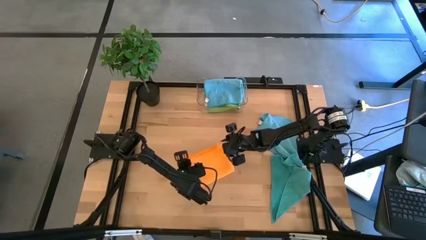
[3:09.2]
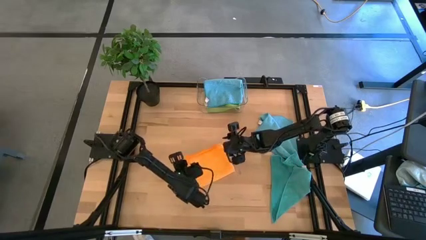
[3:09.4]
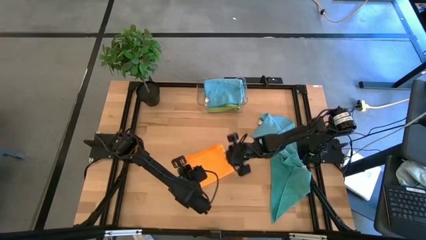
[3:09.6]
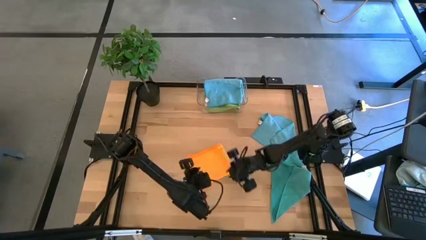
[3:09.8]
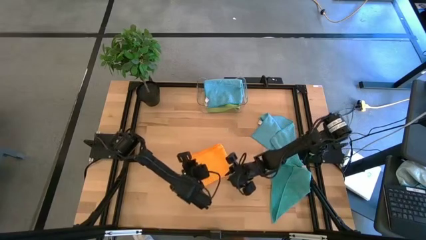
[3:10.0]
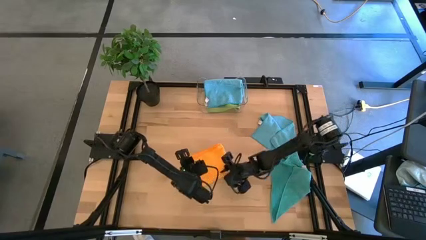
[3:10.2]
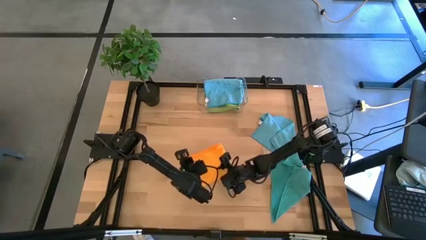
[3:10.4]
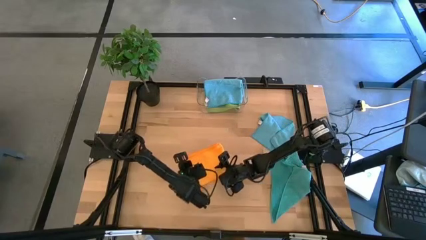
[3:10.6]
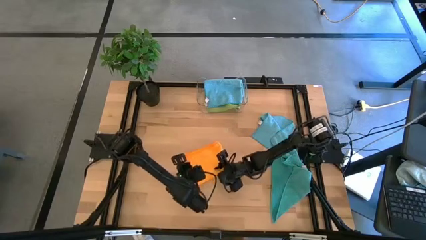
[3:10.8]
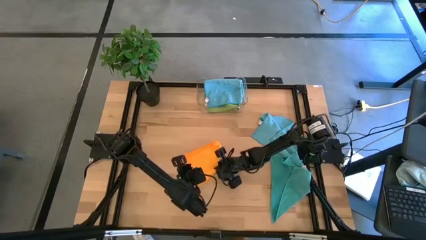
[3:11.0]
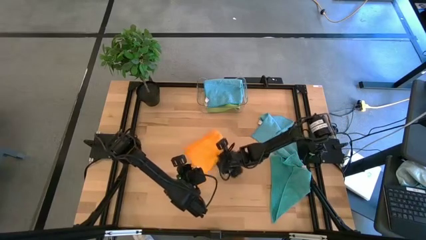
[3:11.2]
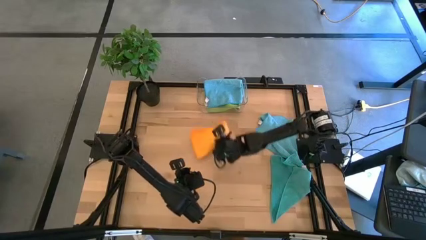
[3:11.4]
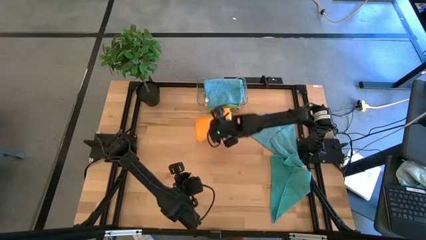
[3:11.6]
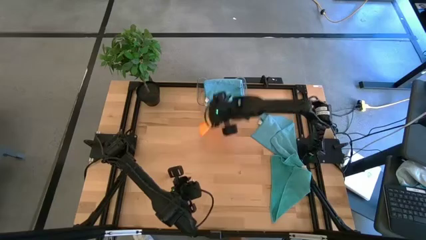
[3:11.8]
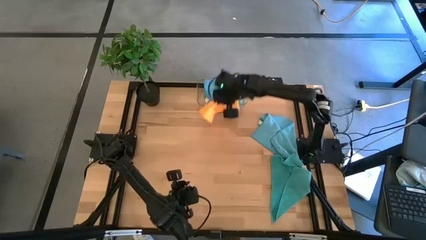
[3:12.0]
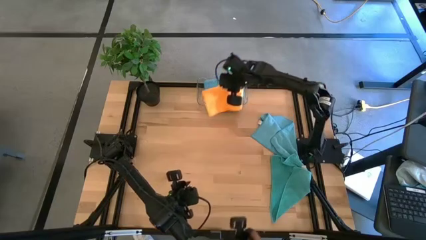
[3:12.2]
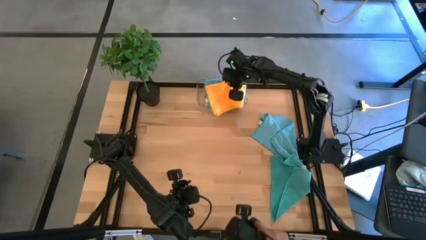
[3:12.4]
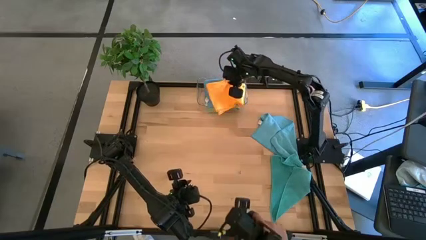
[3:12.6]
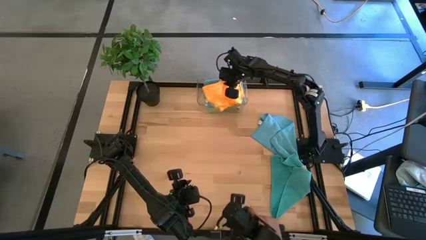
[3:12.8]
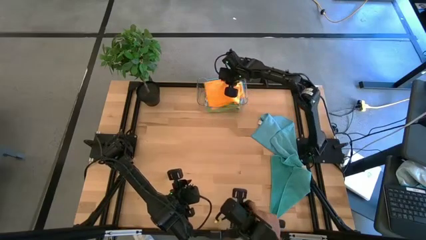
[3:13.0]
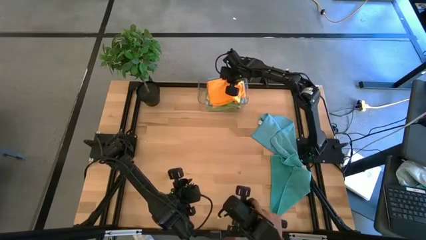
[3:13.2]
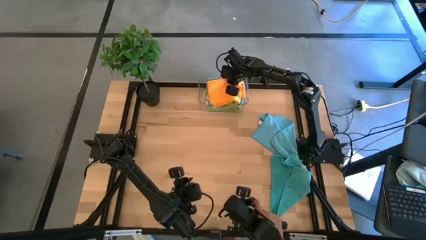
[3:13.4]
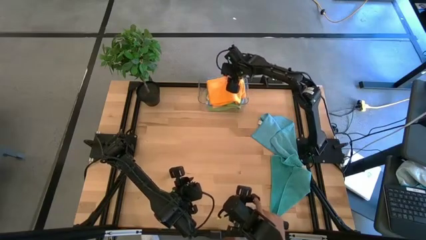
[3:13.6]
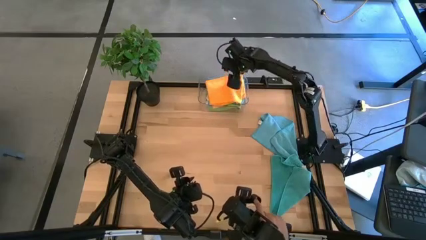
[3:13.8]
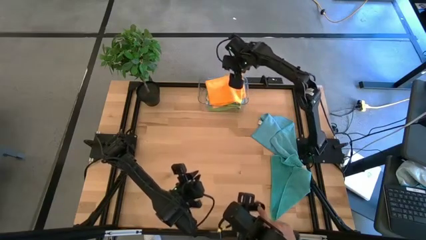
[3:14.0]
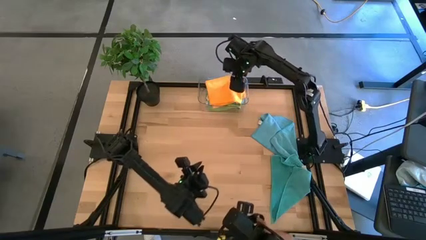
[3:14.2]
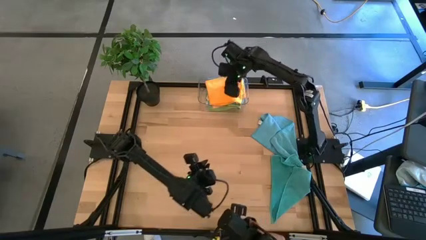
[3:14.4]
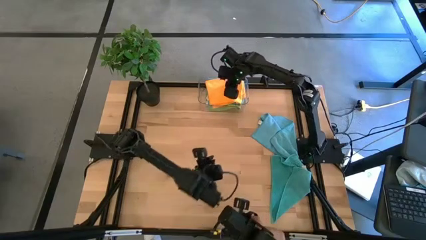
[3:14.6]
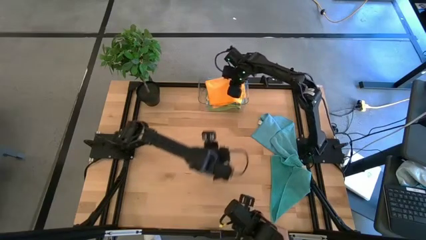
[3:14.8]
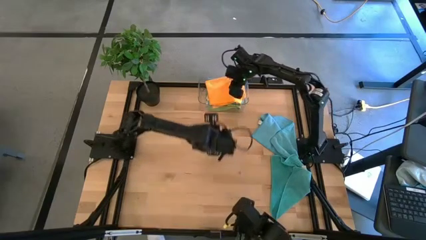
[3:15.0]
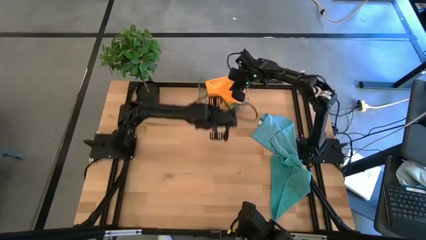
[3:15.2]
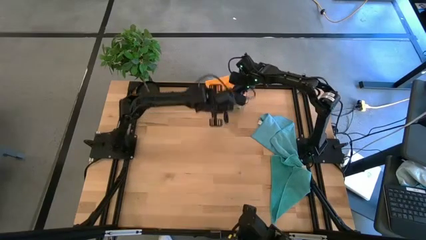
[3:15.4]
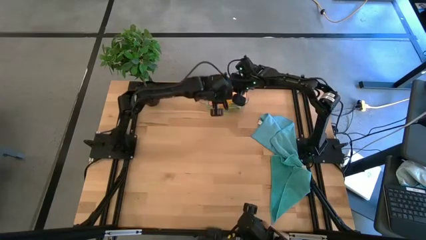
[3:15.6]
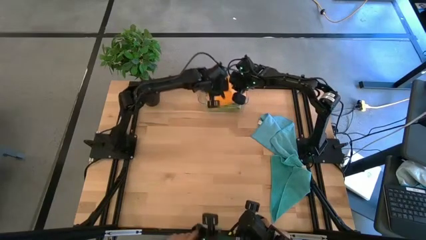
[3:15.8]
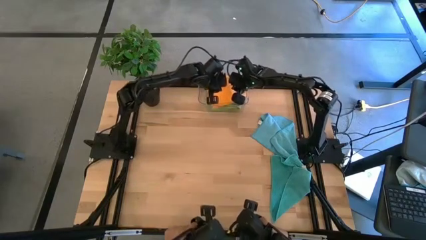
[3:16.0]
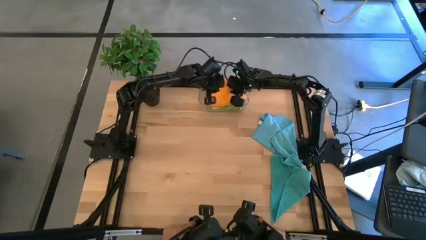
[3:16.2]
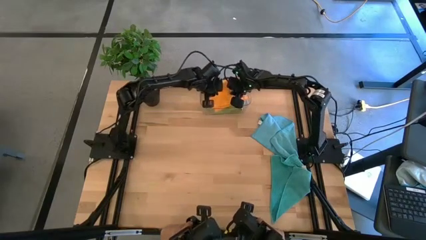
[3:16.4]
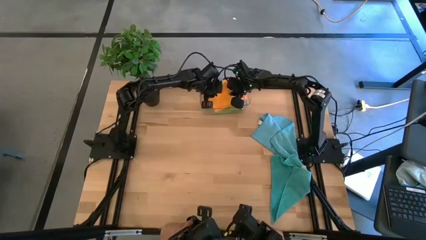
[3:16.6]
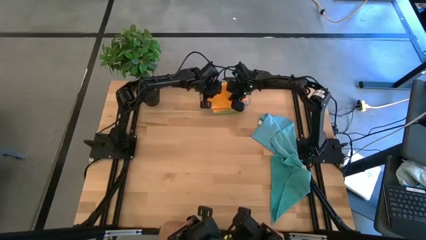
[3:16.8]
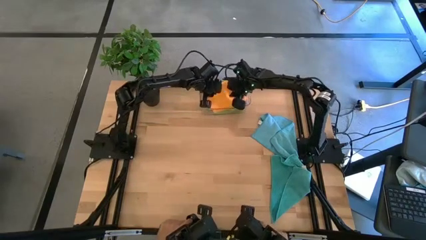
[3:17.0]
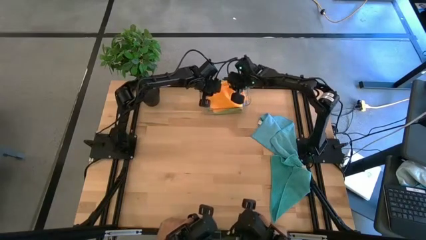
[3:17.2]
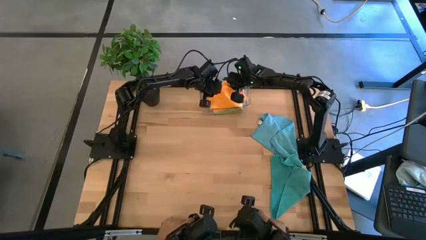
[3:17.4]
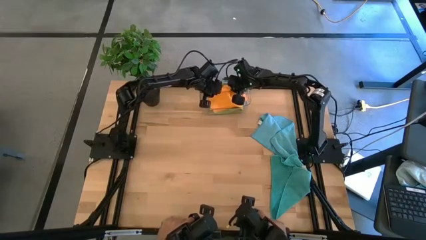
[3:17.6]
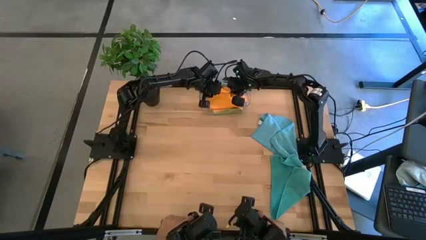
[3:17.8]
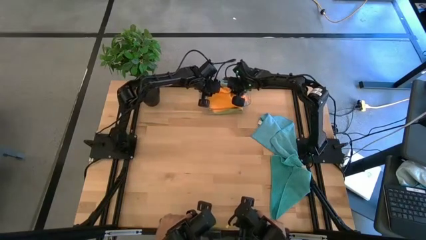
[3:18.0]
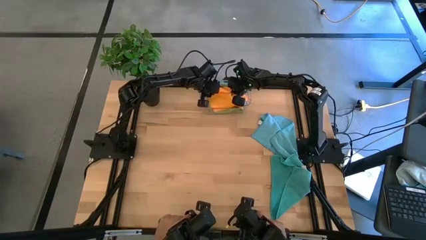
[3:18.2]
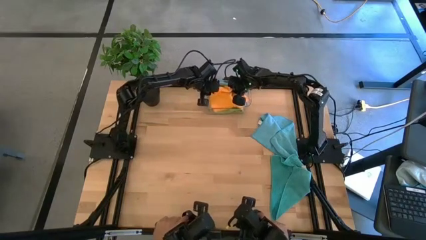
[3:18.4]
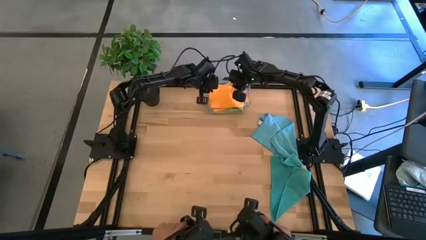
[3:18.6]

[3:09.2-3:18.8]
Task: Fold microfiber towels
Put the folded orange microfiber towel into the transparent bin

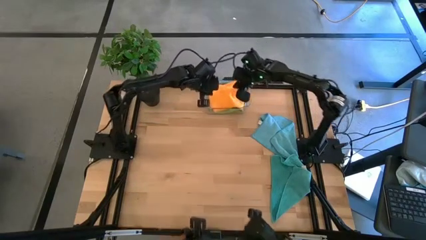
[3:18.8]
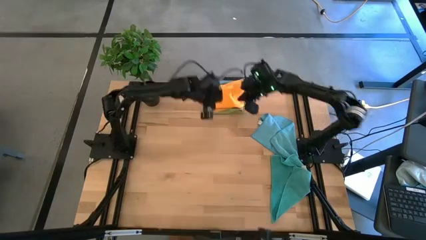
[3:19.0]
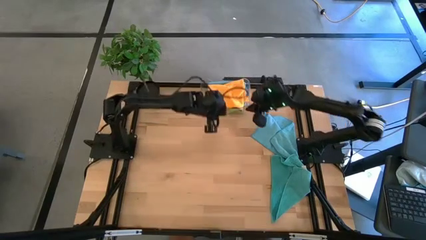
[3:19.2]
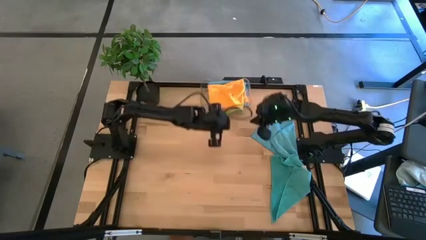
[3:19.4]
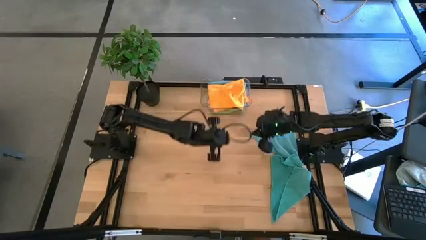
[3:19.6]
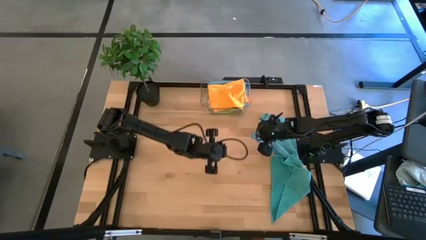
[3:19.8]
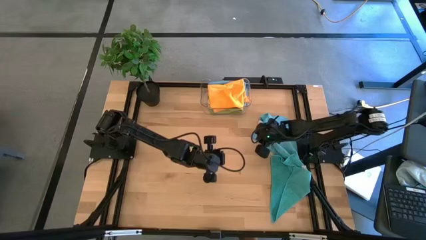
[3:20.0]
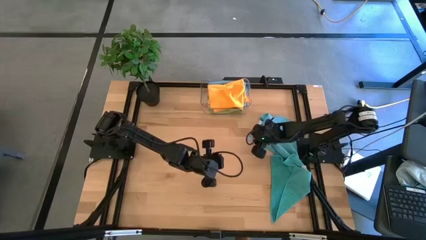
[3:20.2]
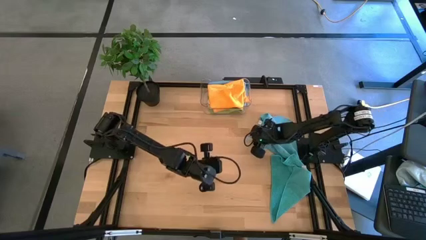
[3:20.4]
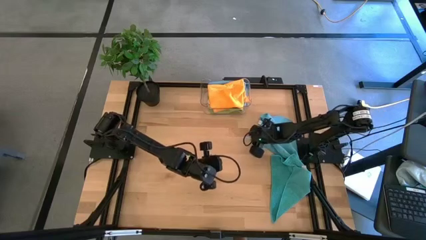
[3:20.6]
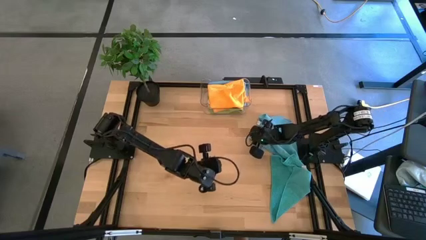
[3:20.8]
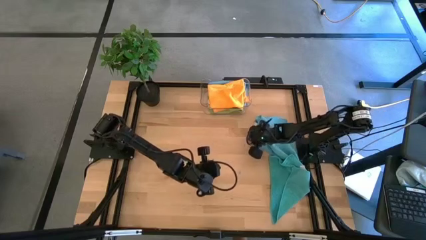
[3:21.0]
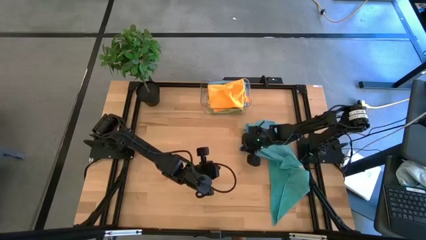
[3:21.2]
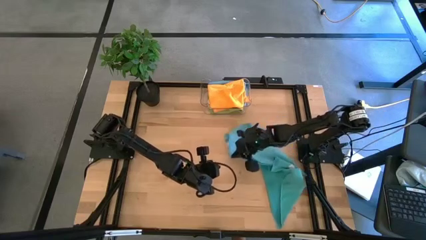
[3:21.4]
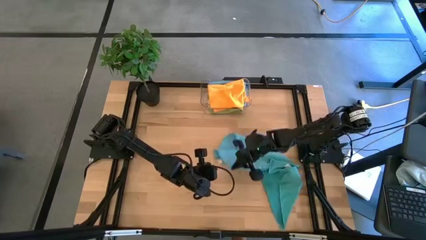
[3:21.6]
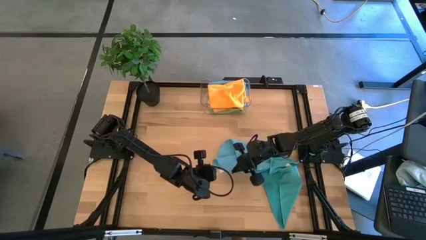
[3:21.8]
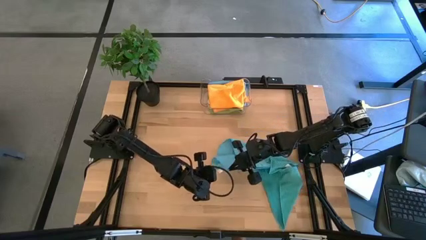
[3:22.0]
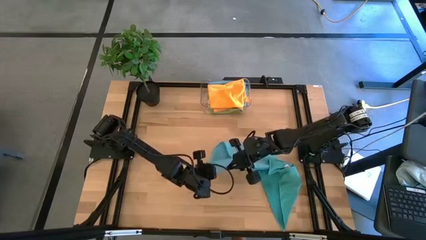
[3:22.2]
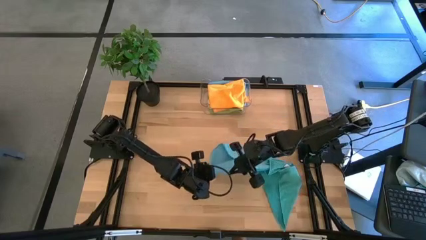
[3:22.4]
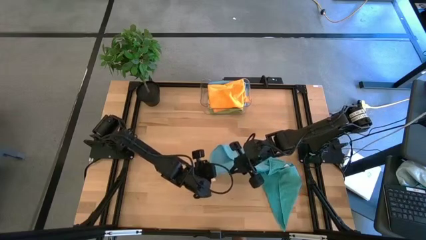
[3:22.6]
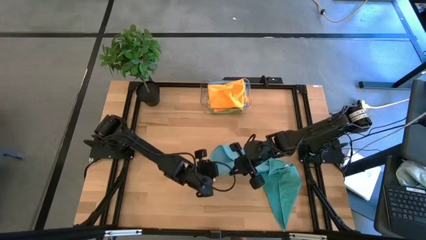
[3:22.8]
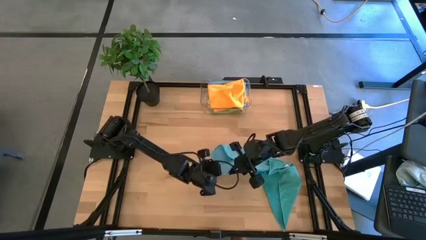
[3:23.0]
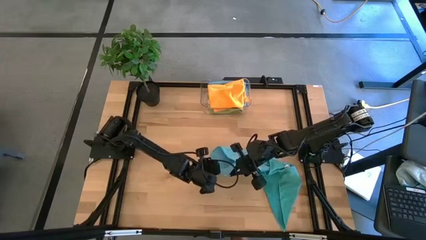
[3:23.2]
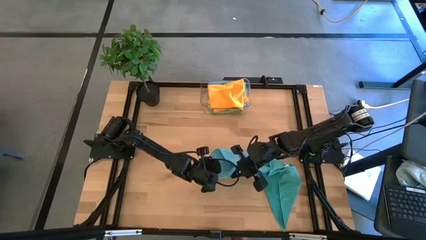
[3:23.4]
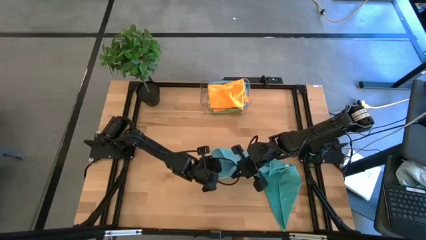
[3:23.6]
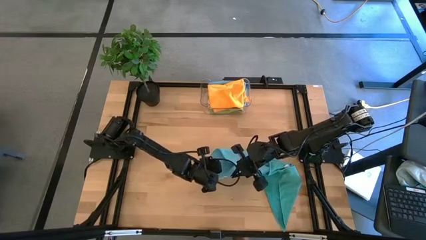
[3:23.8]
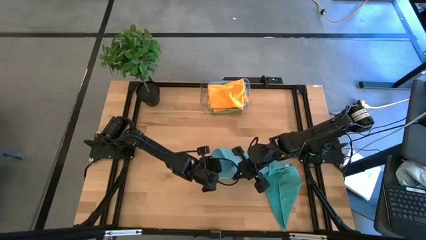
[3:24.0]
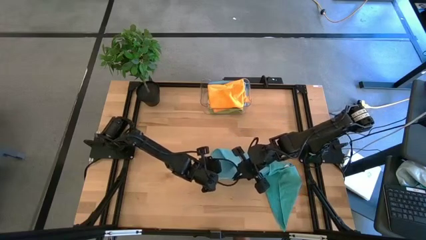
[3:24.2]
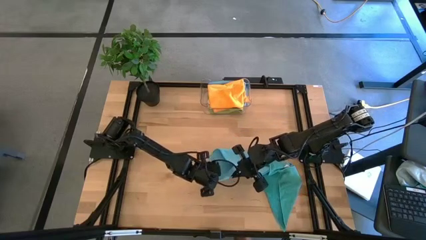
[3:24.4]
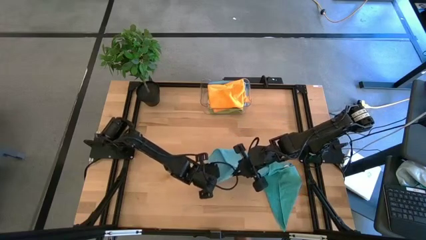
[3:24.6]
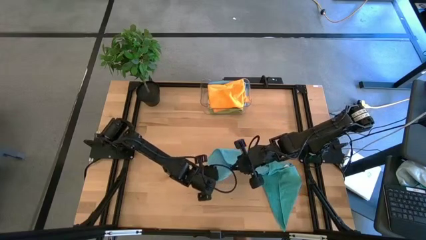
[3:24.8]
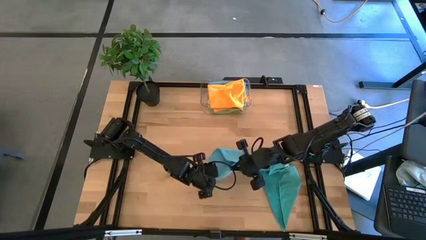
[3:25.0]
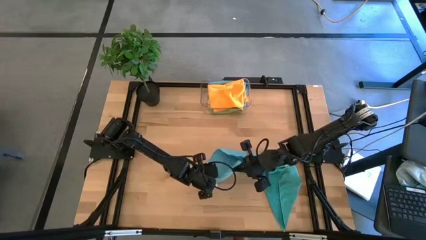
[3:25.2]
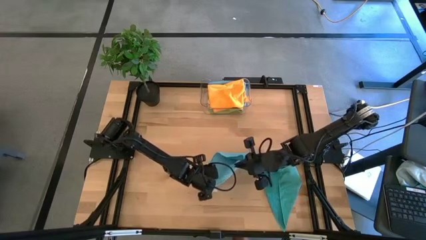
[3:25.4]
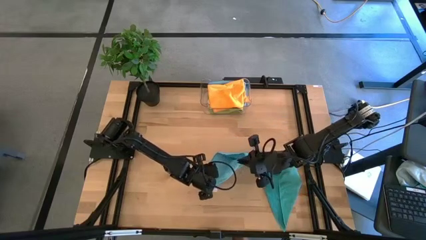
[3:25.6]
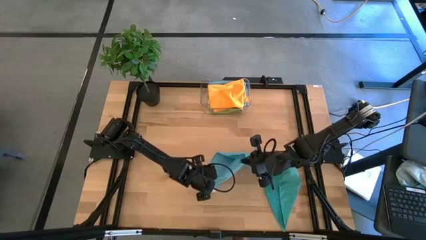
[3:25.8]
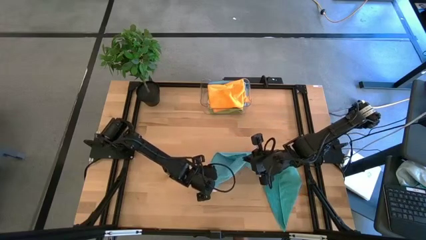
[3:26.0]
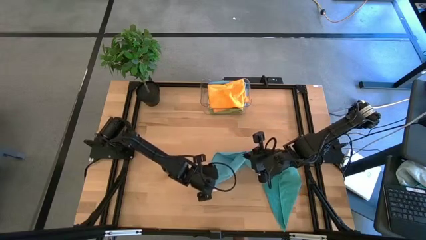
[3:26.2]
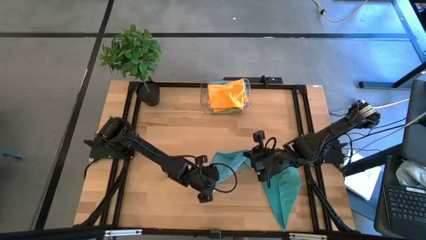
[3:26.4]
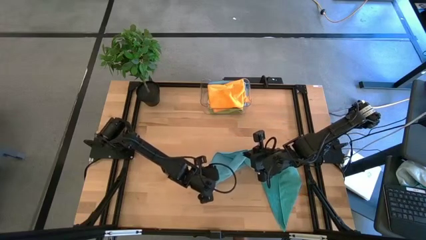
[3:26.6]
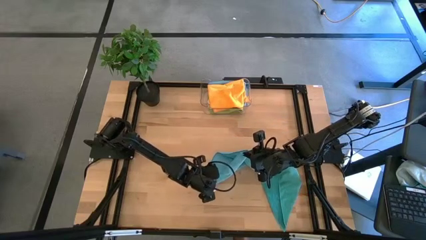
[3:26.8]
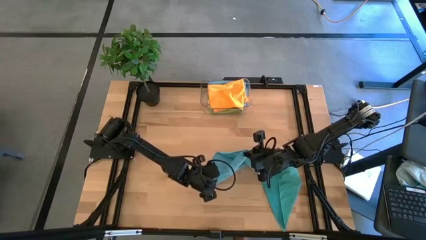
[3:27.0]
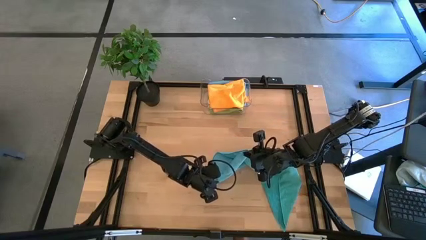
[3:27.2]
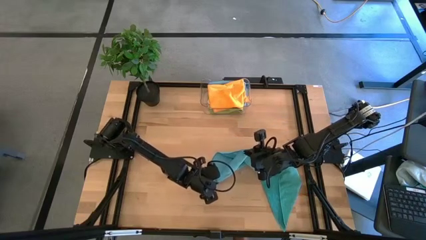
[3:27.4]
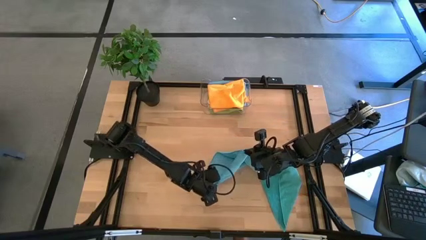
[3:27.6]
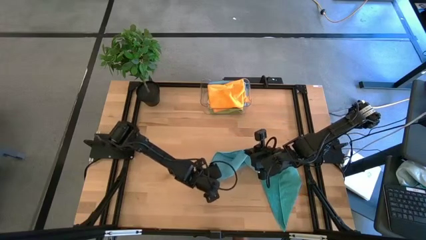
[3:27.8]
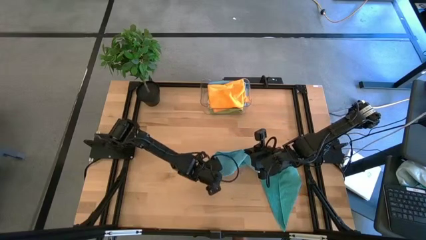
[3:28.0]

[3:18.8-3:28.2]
Fold the top blue microfiber towel
